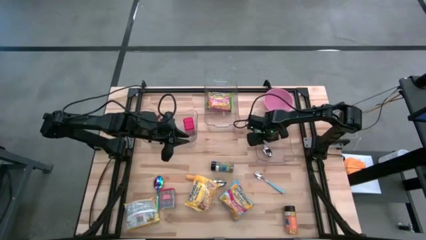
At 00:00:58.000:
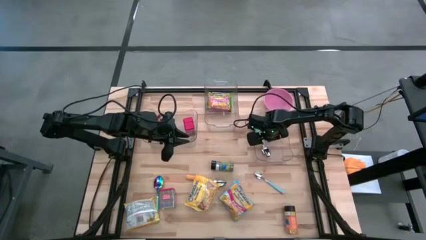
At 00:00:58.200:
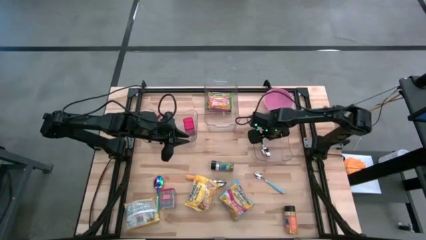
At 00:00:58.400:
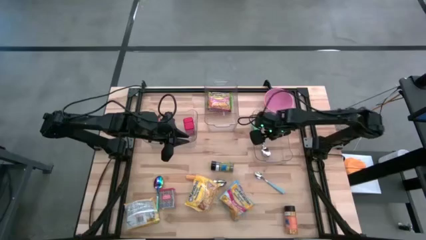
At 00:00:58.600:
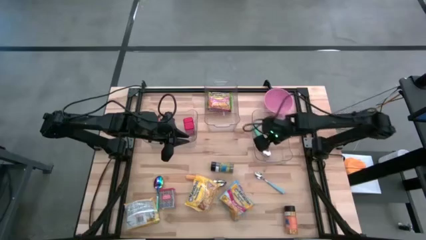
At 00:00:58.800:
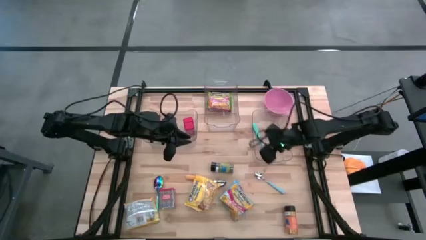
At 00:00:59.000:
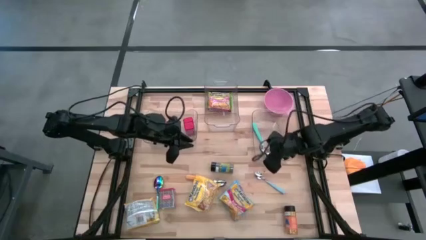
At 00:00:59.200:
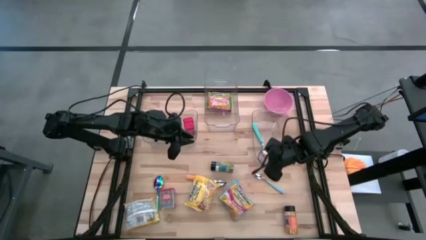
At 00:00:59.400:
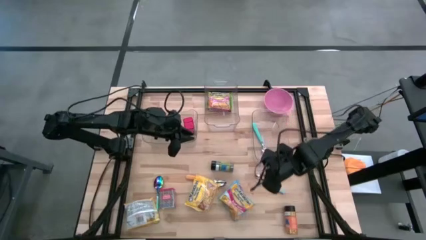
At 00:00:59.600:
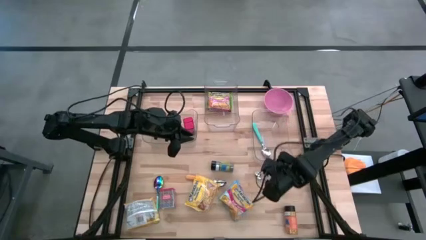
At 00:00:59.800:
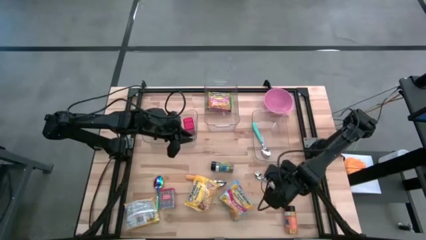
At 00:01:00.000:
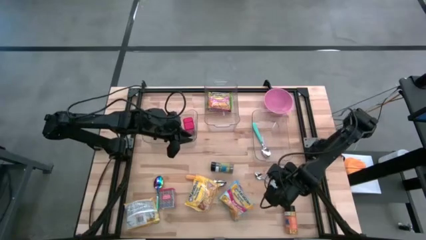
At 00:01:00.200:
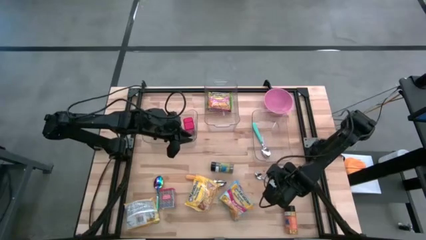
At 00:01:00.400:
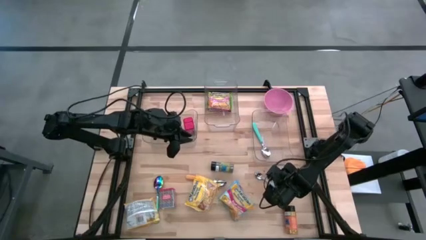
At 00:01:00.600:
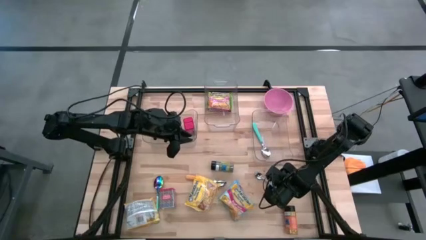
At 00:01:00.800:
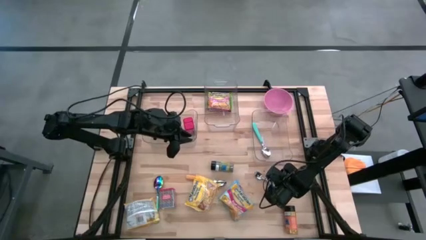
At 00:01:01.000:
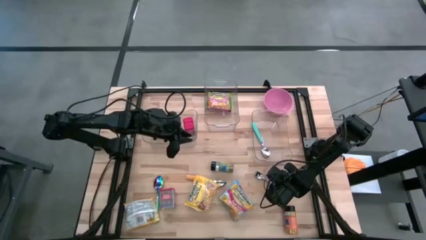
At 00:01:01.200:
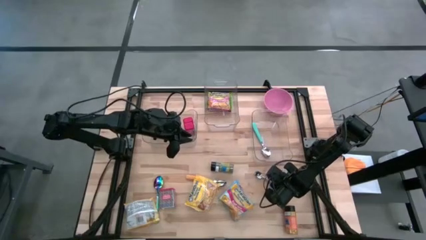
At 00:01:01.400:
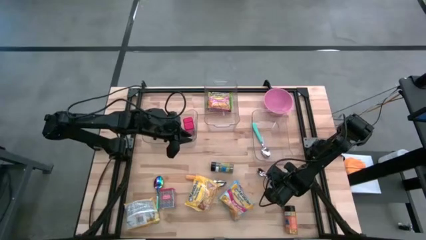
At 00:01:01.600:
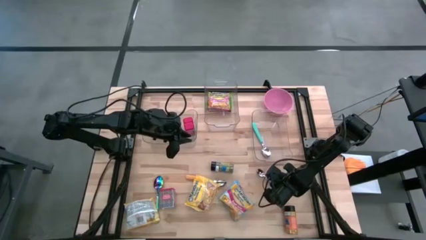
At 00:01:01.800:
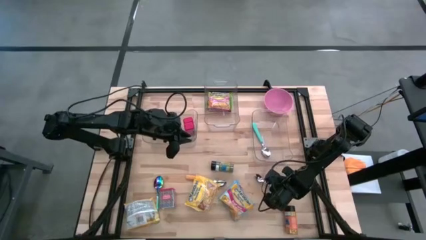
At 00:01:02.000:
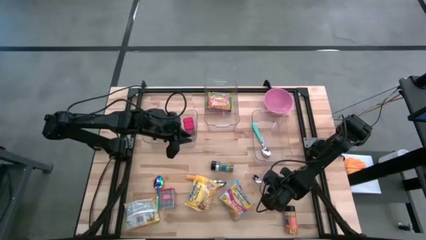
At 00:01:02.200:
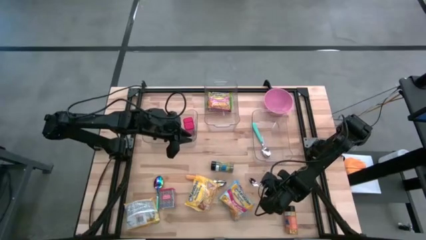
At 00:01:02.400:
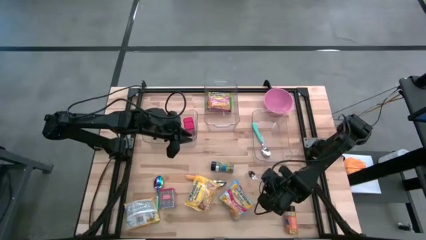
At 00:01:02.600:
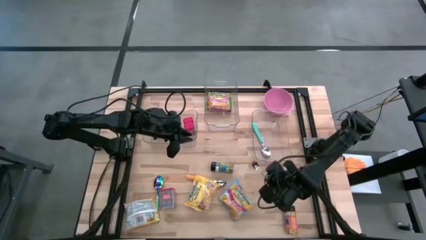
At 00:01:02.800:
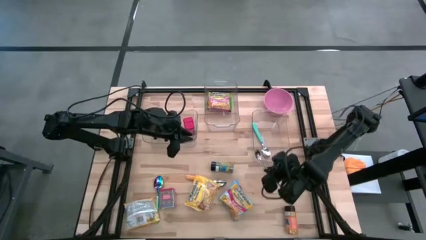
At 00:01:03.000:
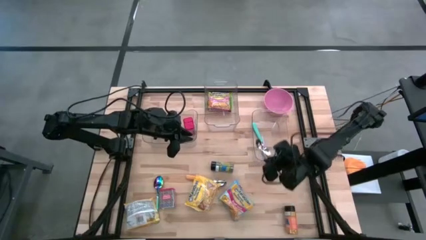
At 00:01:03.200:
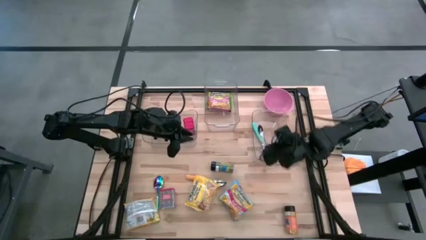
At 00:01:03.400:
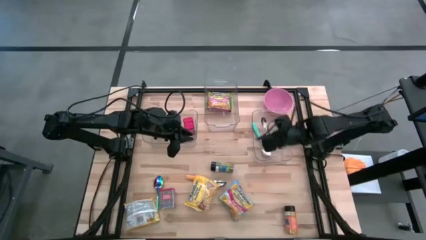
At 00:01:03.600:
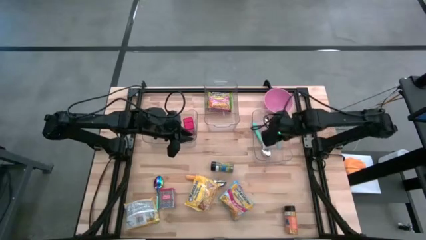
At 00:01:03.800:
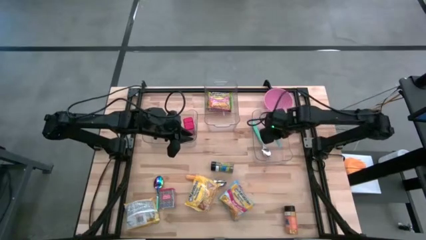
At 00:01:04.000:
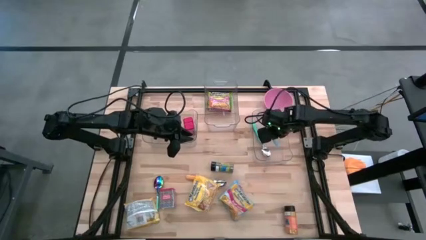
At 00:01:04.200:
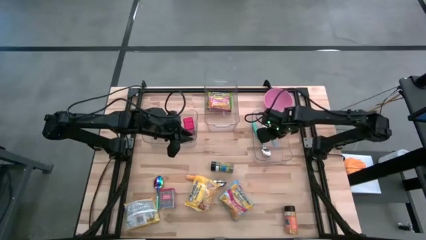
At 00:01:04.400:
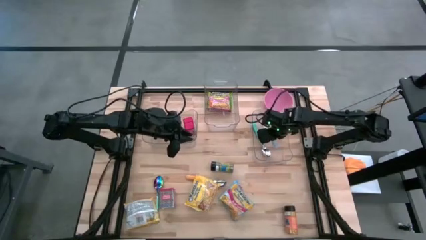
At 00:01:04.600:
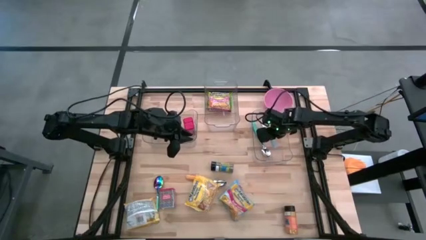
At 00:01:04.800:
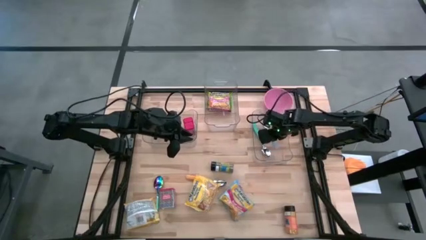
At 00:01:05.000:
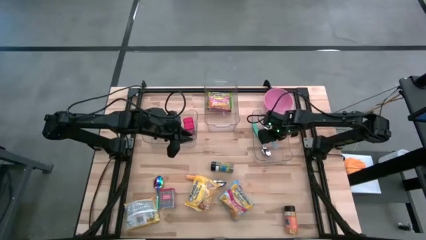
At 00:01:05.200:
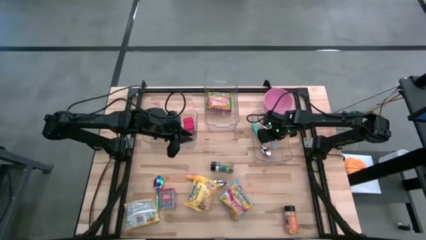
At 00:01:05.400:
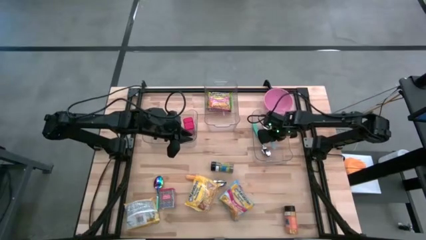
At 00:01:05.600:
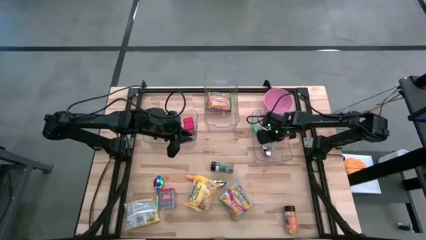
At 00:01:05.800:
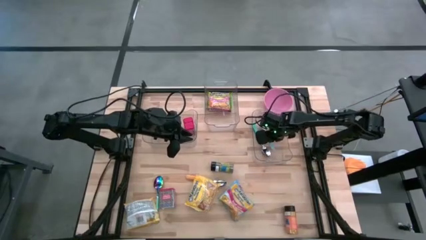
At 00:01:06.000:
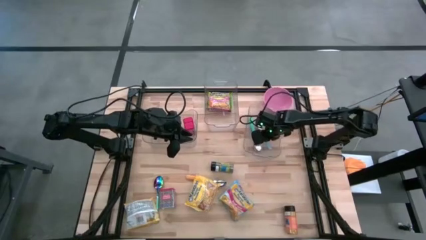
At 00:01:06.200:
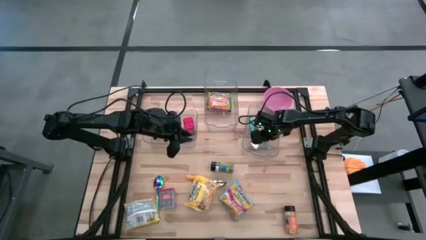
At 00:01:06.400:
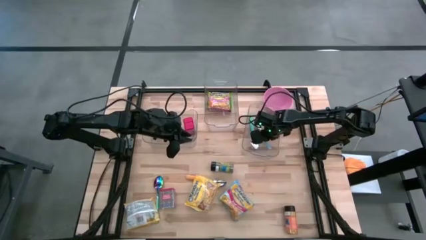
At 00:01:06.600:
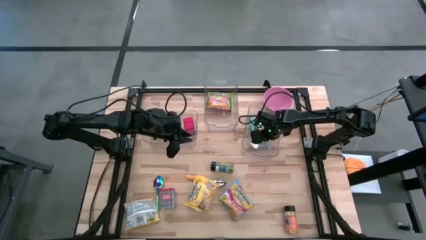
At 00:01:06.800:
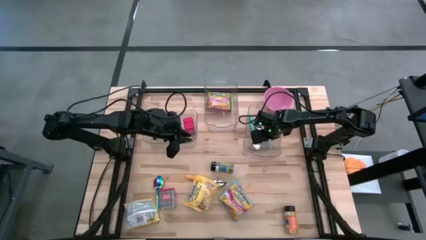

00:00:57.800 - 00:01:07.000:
Put the blue spoon into the right transparent bin

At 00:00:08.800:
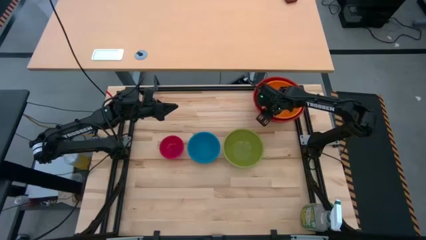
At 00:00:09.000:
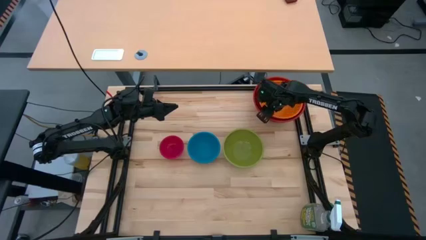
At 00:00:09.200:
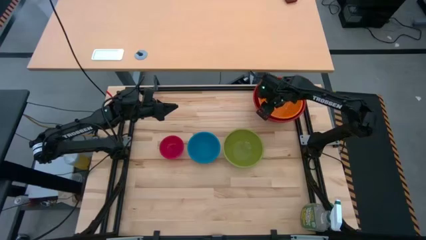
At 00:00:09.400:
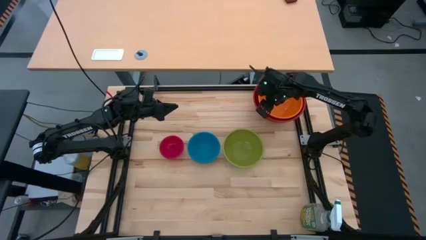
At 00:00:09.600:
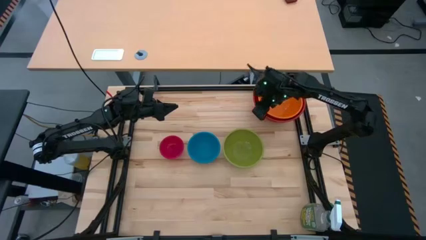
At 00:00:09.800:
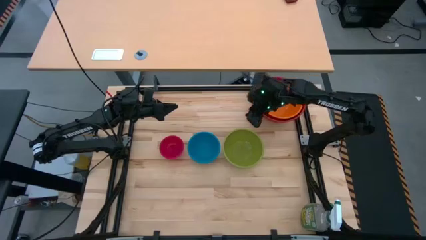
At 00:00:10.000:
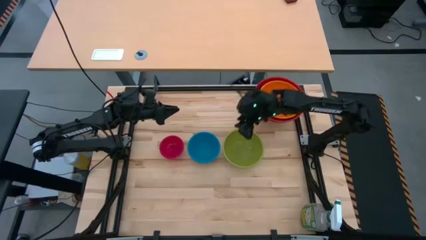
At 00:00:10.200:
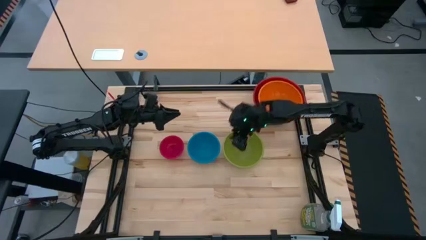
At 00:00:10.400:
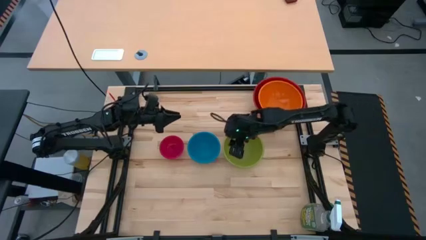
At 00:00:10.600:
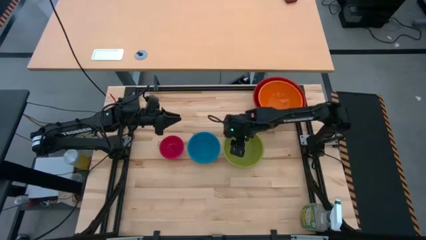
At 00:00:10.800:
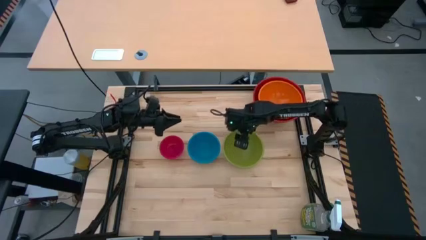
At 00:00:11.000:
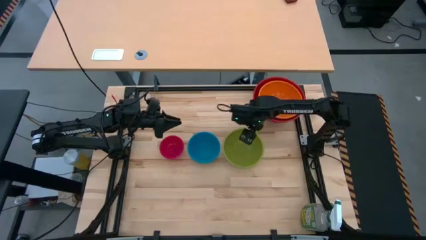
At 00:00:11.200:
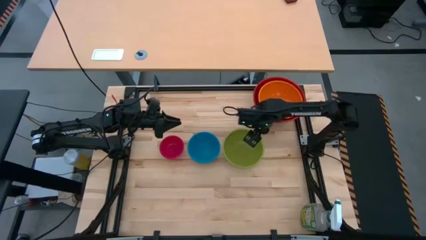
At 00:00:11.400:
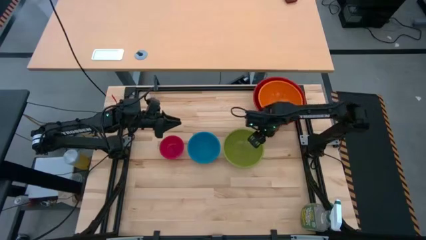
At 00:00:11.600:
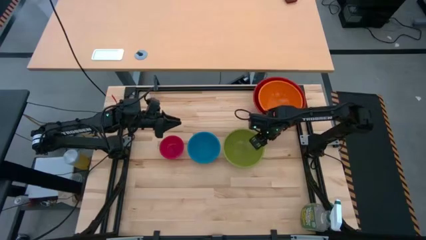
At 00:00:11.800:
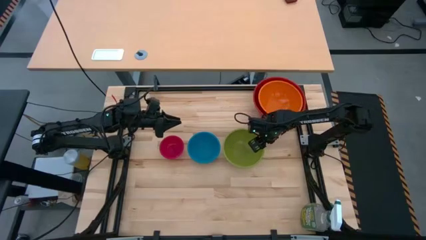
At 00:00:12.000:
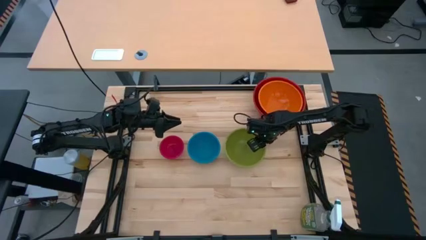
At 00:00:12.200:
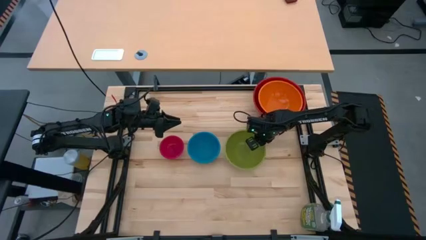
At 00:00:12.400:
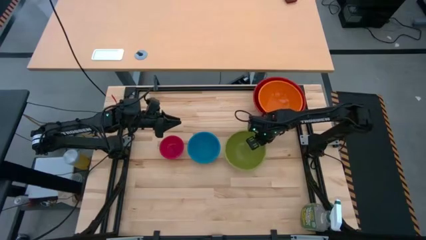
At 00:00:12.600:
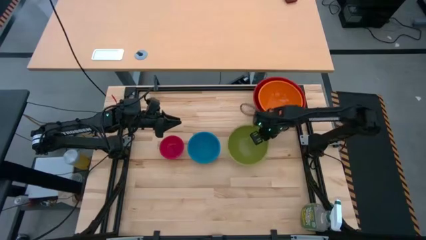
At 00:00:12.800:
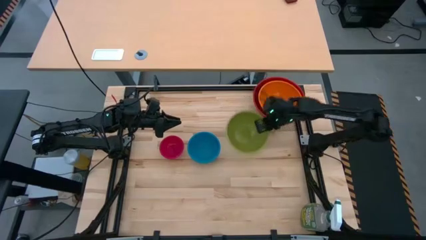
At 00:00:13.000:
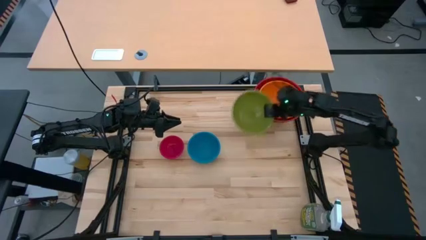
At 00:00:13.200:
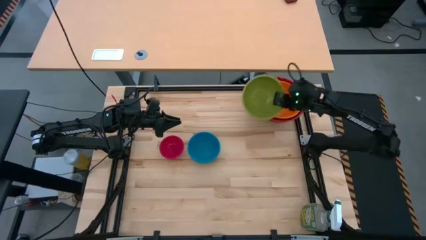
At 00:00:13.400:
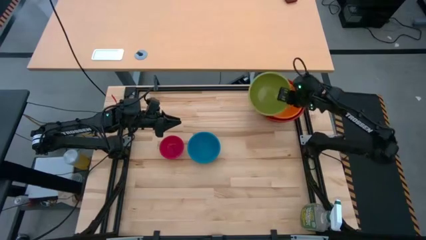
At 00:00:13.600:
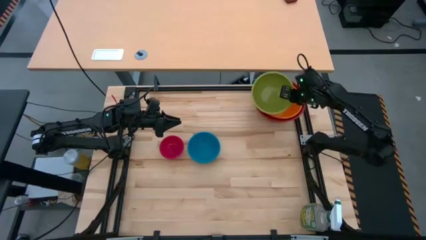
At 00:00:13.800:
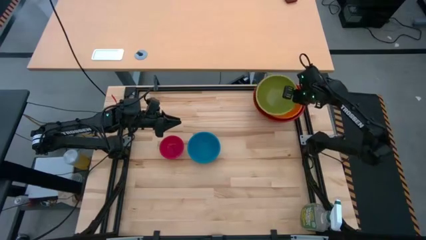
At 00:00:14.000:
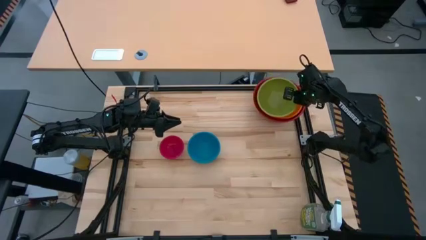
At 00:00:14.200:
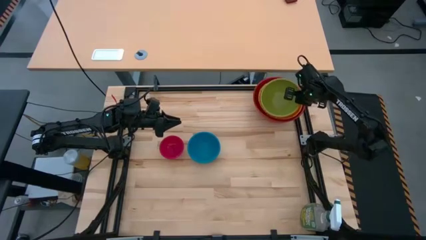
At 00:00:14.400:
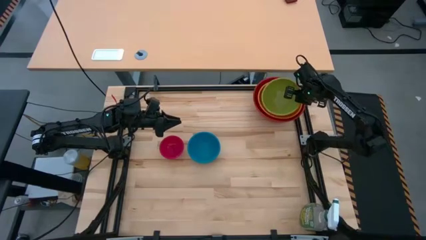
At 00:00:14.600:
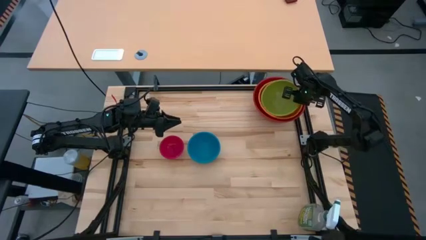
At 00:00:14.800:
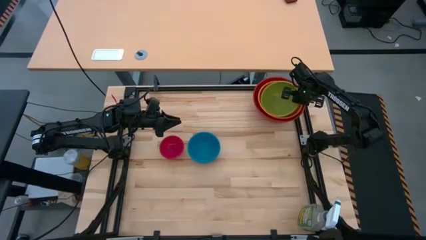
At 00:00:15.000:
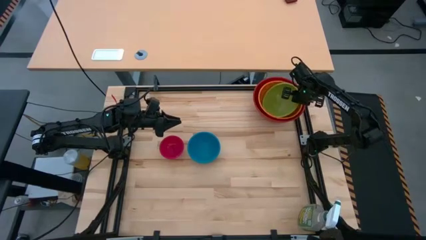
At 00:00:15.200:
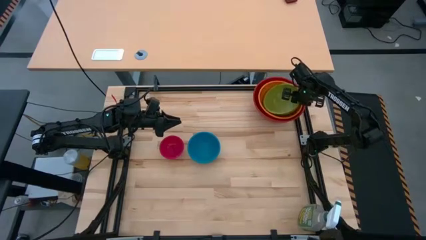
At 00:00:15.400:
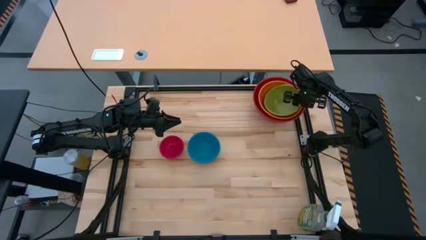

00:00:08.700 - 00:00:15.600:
Stack the green bowl on top of the orange bowl
